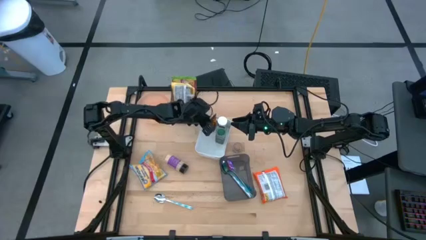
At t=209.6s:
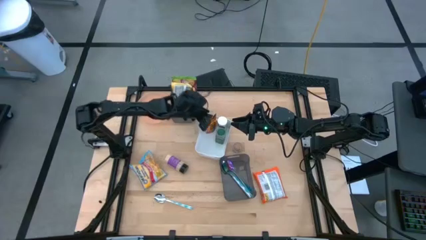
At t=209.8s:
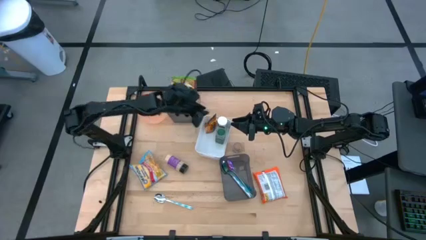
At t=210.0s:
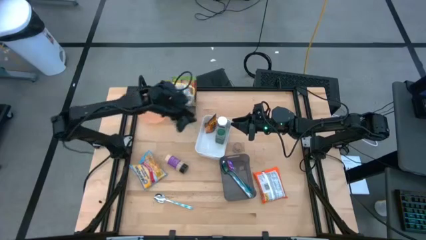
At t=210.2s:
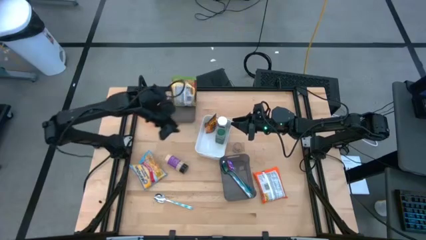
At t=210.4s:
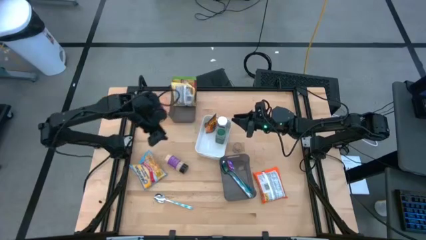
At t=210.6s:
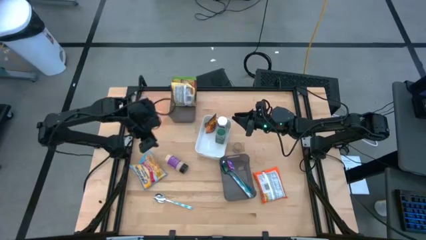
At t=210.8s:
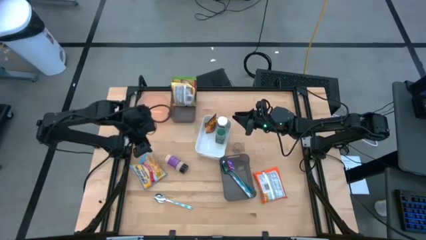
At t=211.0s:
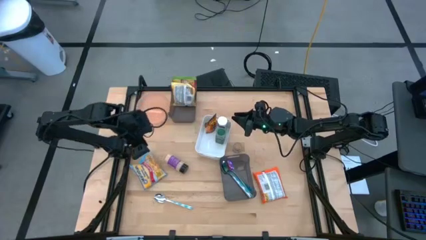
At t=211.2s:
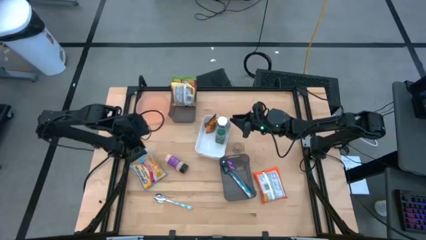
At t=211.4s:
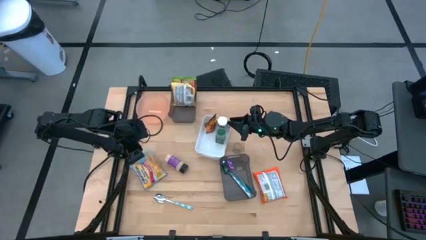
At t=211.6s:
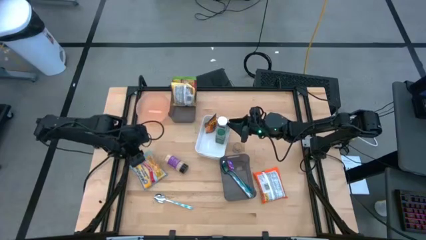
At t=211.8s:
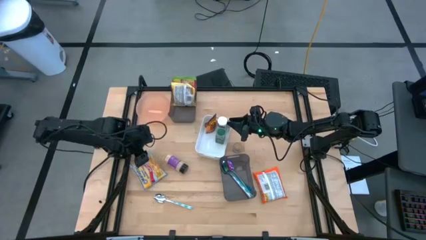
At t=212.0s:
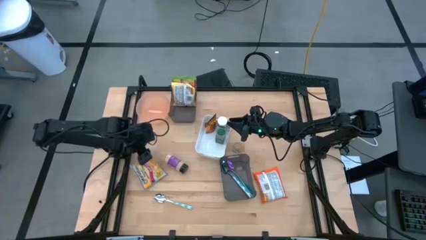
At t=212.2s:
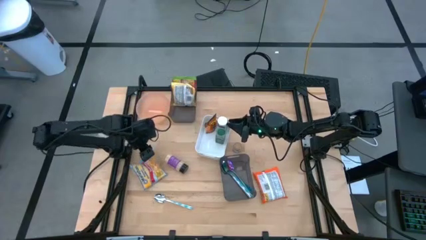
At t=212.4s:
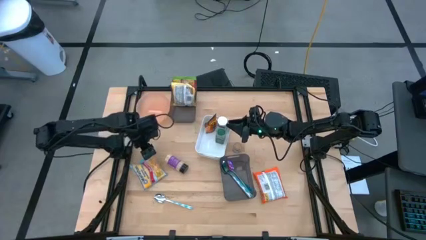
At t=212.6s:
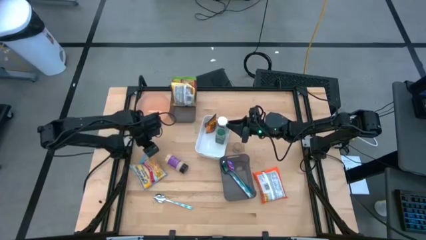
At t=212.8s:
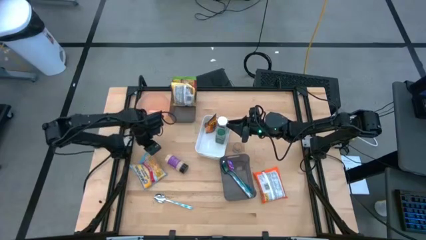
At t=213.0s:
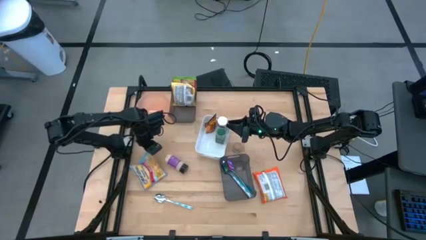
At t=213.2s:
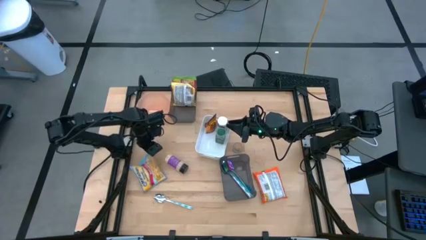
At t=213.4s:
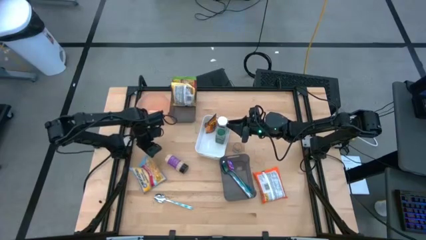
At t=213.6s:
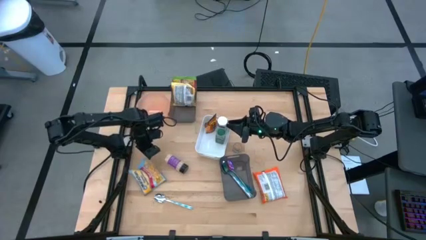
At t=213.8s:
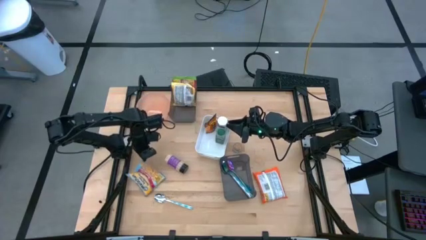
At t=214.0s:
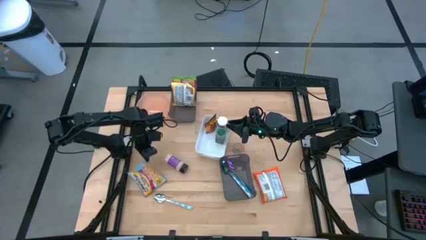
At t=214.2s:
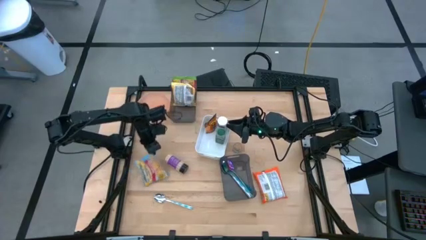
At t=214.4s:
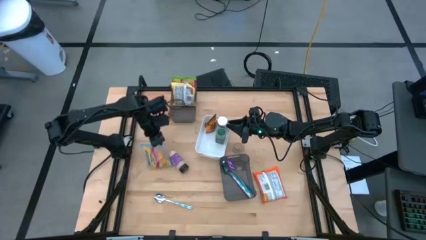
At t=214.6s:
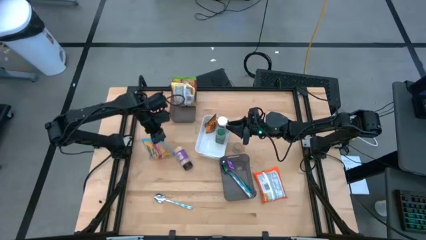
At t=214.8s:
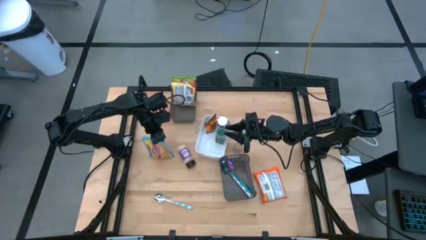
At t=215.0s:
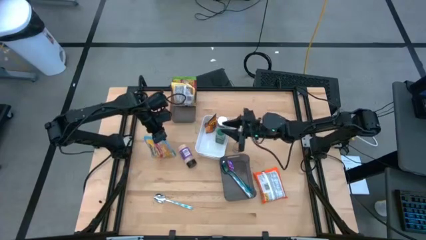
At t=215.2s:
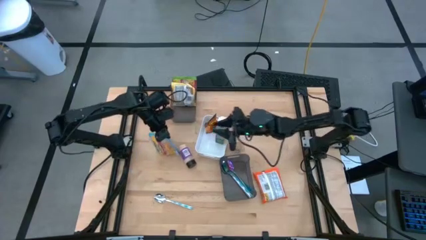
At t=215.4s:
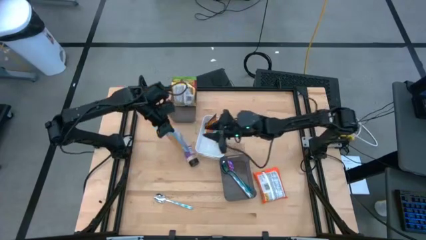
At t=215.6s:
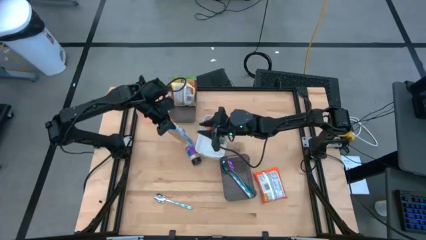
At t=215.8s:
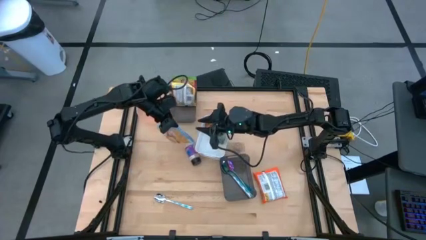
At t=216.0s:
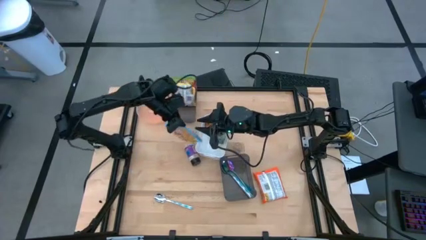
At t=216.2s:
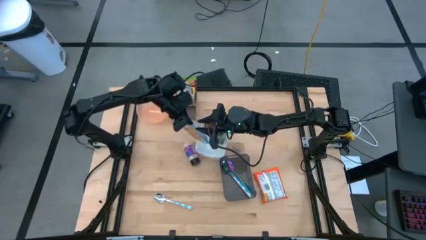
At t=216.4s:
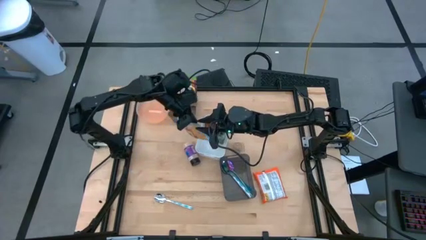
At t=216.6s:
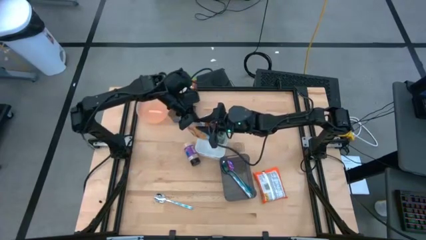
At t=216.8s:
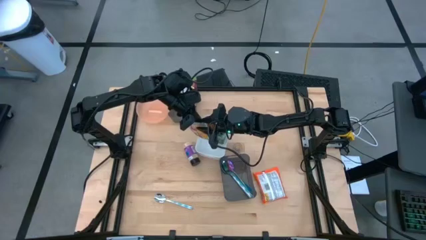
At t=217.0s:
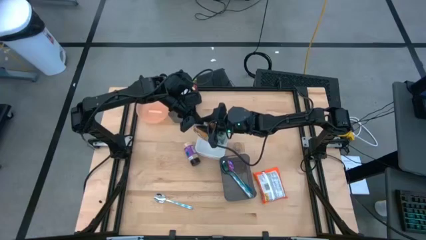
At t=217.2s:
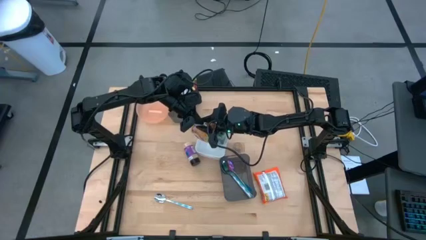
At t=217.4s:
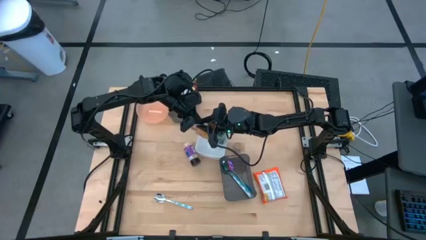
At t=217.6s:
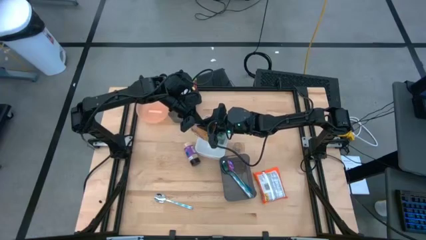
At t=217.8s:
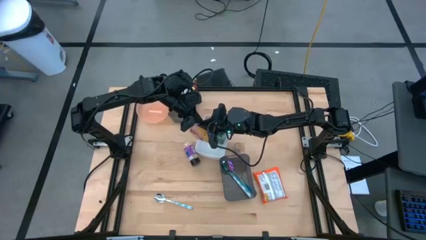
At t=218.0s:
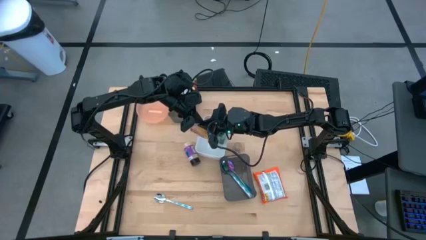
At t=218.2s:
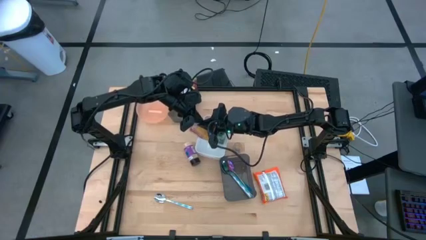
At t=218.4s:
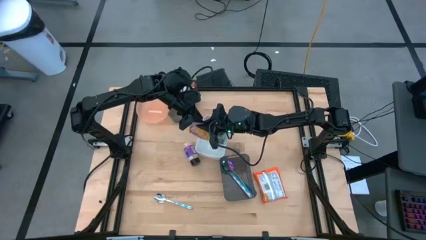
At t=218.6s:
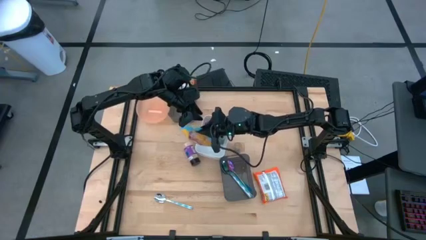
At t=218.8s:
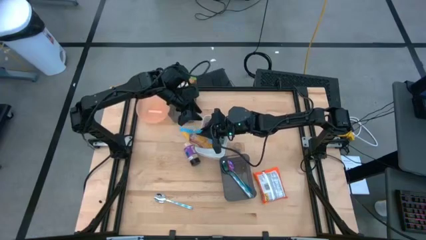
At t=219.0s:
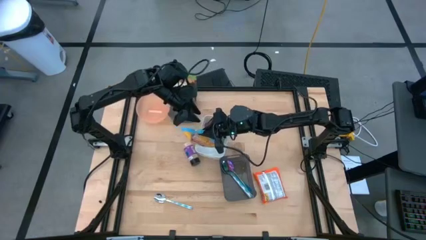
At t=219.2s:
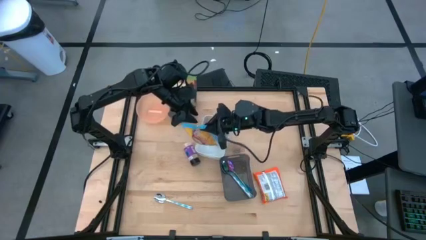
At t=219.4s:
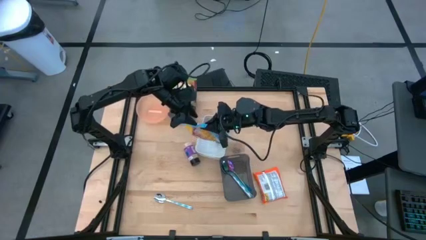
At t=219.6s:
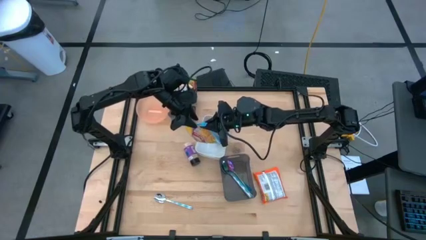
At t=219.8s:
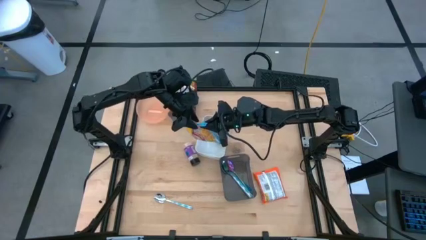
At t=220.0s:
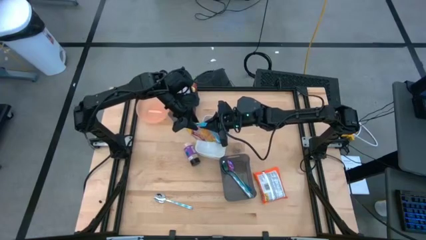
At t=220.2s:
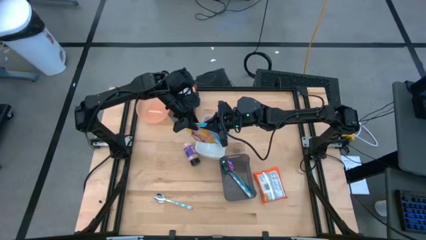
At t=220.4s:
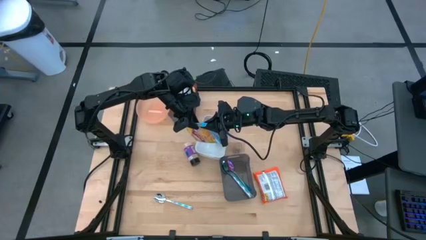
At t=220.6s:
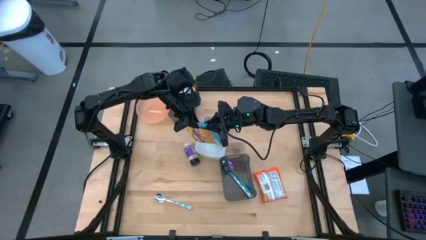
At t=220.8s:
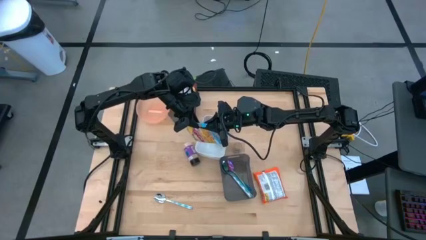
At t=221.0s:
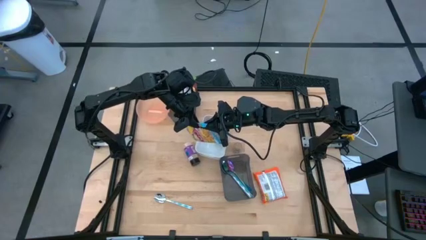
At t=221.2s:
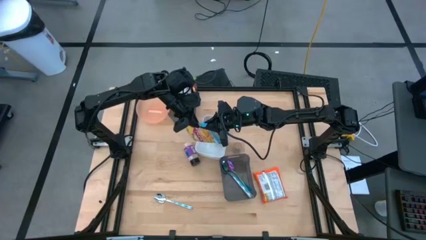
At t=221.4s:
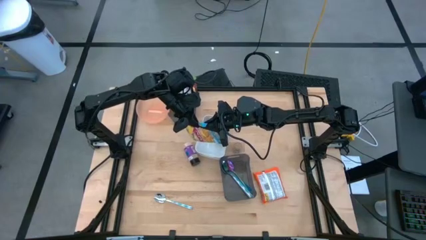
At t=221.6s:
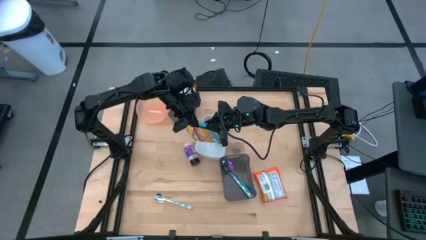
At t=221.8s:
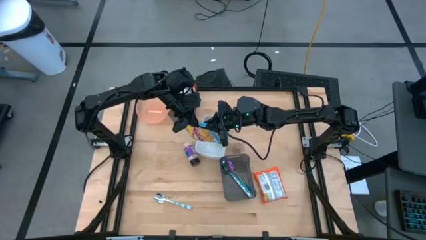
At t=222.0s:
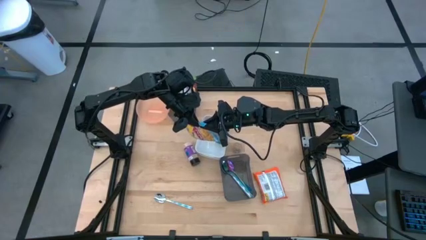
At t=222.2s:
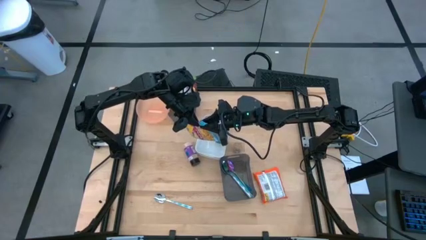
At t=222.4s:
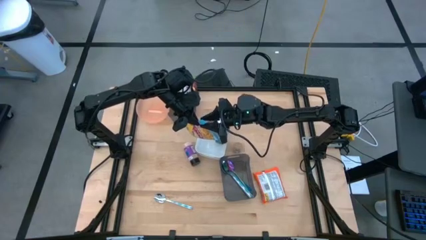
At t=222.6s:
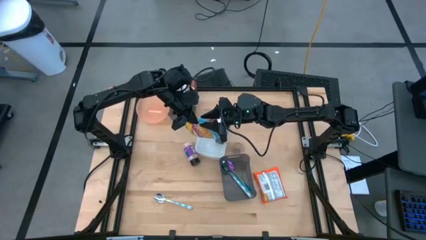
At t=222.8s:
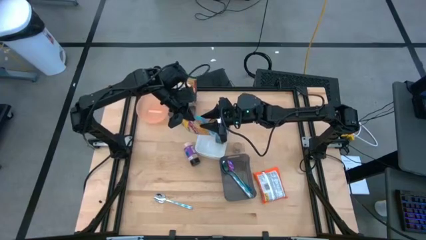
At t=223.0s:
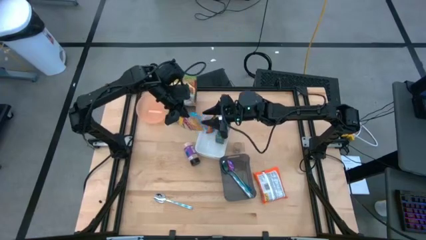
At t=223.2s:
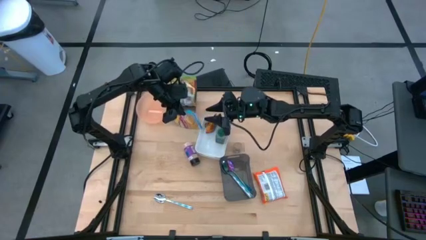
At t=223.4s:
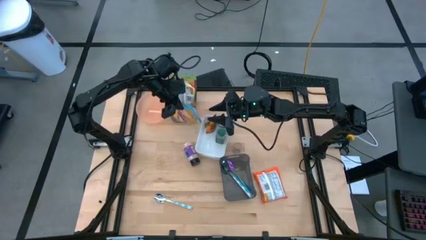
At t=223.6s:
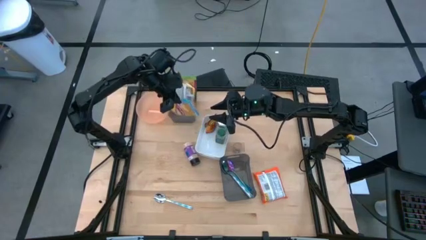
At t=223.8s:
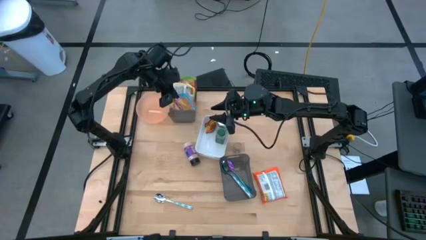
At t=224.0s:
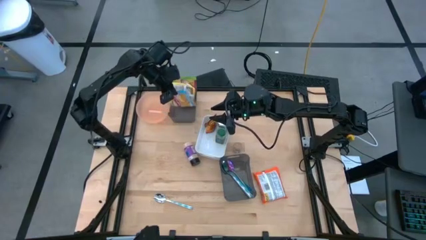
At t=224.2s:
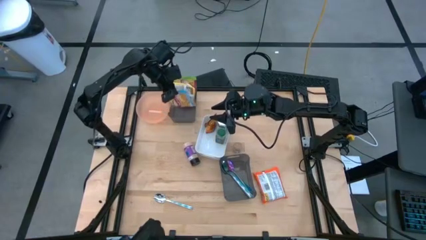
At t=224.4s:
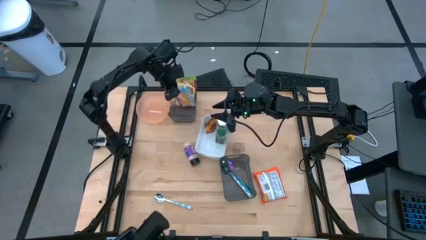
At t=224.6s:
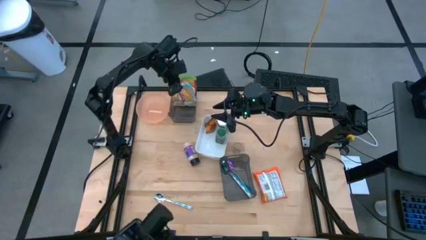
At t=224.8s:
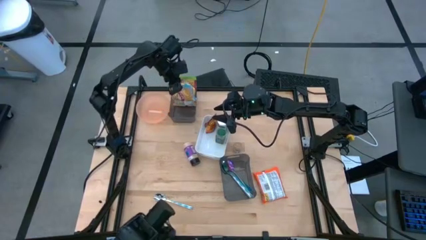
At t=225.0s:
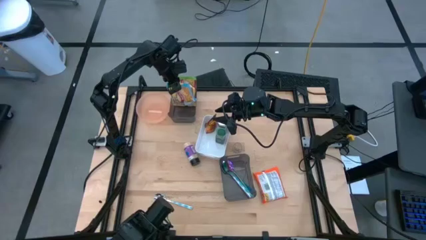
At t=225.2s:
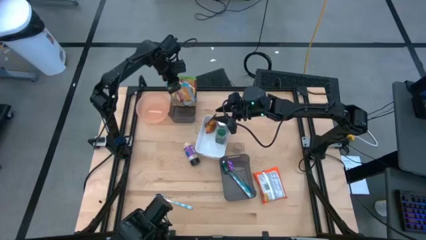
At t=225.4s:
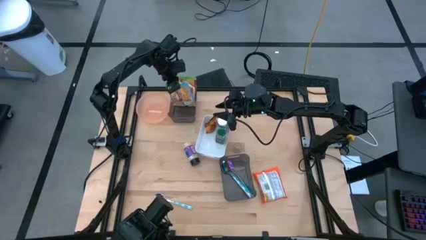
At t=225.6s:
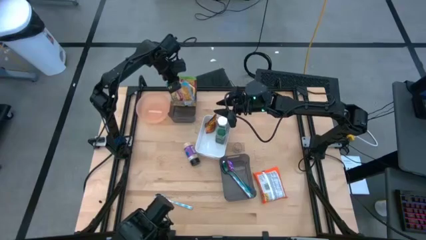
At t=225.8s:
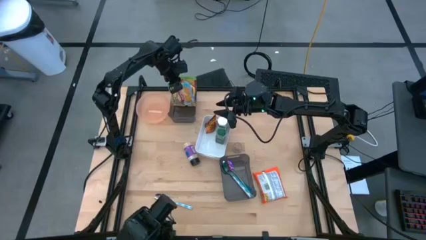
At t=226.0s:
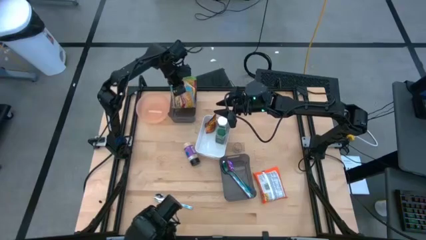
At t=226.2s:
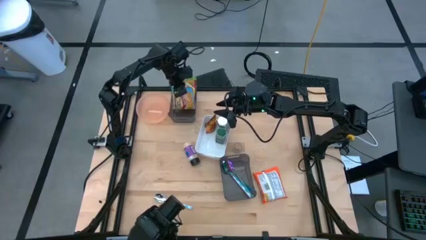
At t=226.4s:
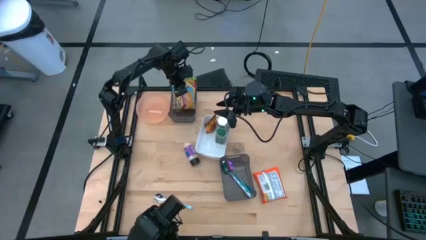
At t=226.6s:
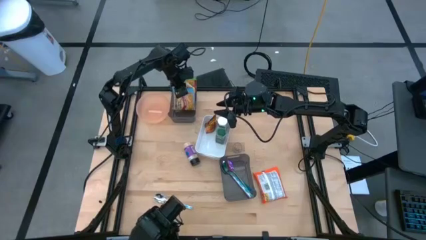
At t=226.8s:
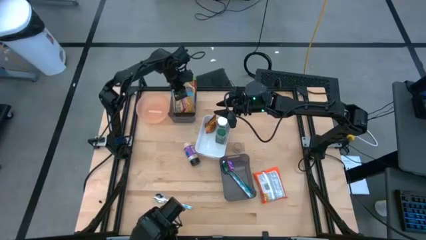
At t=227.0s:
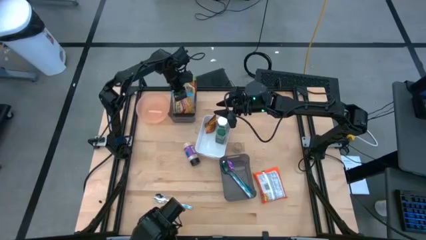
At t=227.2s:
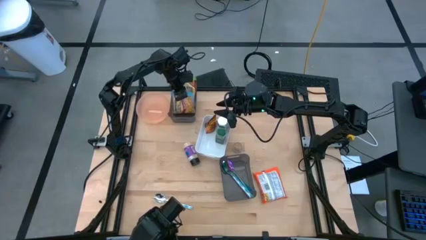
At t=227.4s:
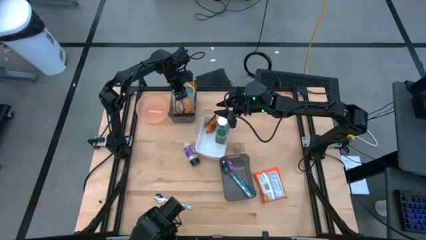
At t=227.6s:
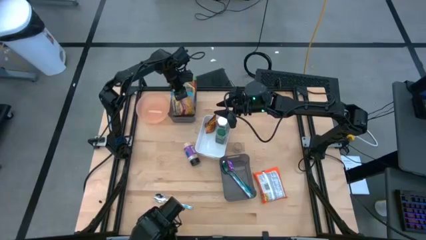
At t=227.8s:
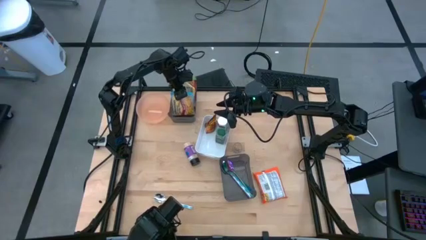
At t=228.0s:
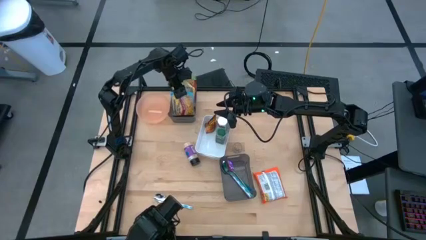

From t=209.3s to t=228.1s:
Task: Pick & Place Food Item
Put the blue noodle pack into the top black bin
